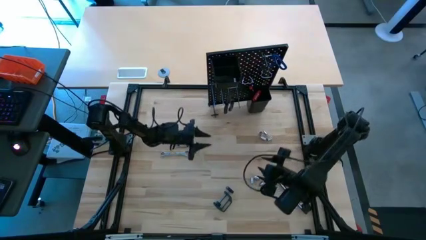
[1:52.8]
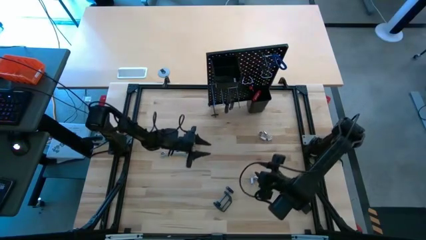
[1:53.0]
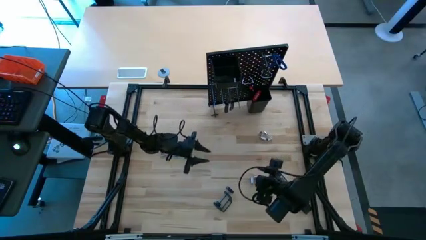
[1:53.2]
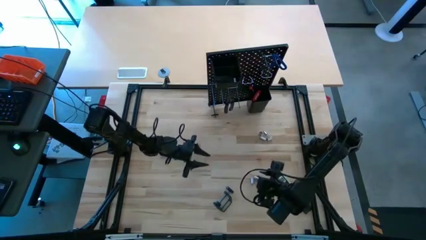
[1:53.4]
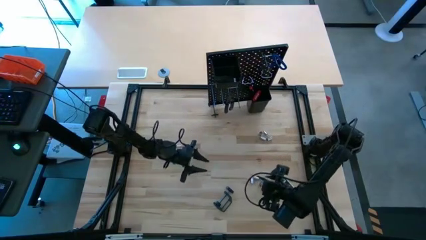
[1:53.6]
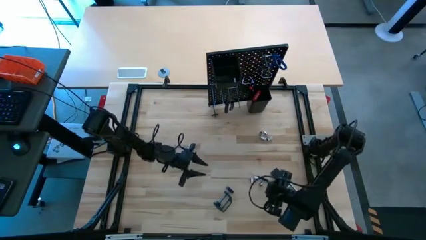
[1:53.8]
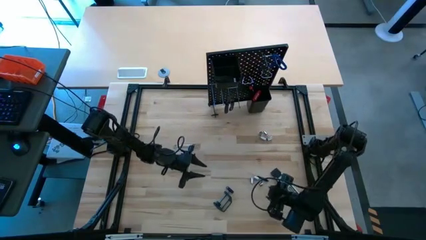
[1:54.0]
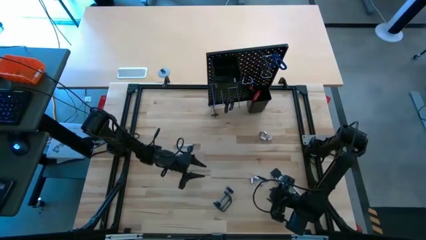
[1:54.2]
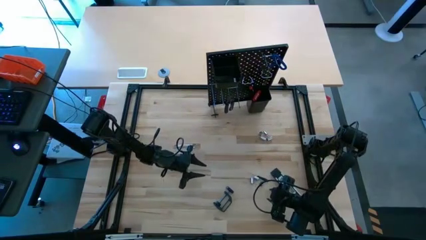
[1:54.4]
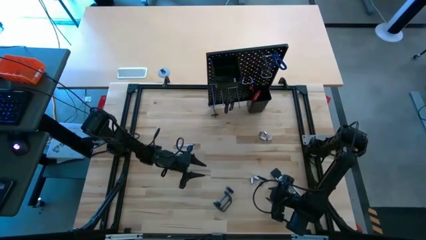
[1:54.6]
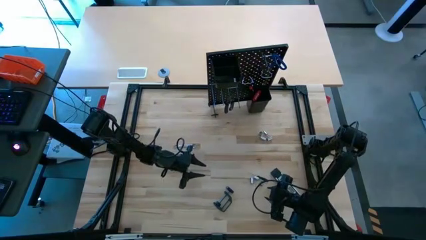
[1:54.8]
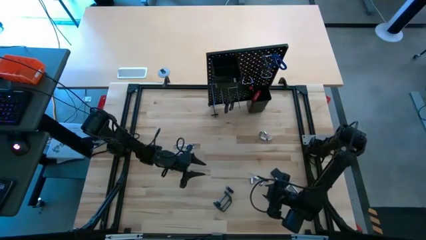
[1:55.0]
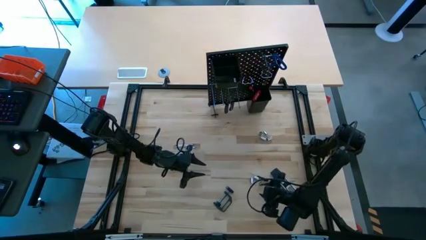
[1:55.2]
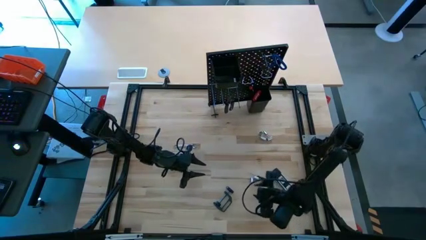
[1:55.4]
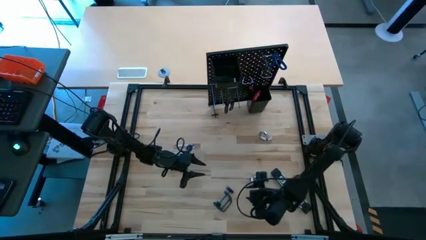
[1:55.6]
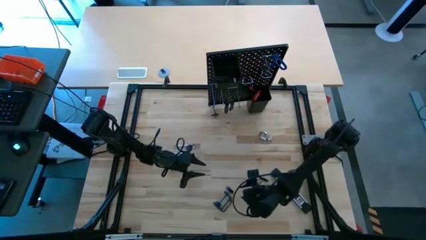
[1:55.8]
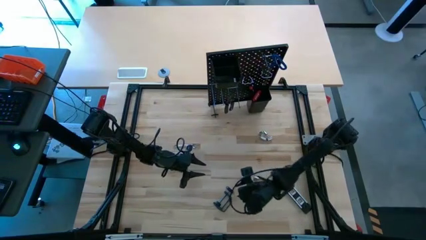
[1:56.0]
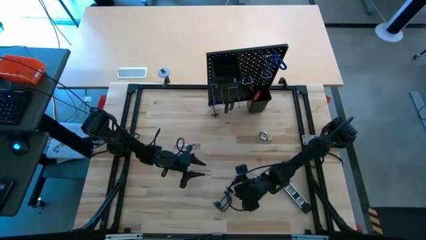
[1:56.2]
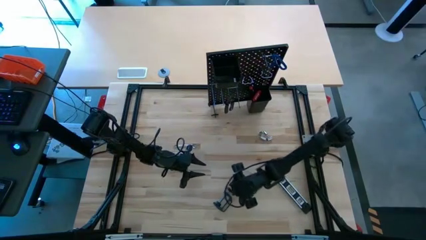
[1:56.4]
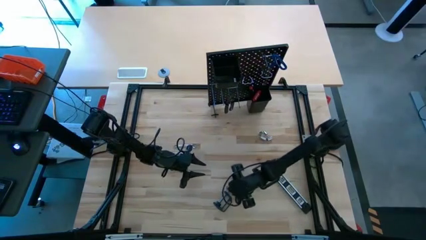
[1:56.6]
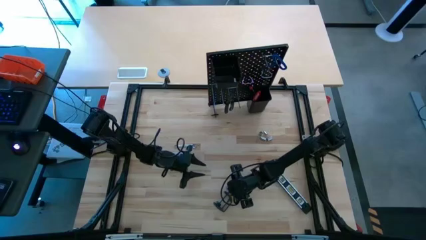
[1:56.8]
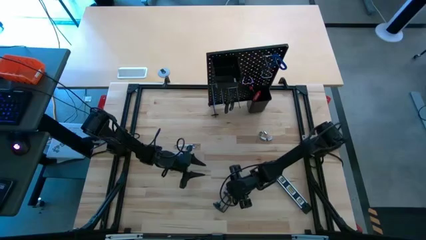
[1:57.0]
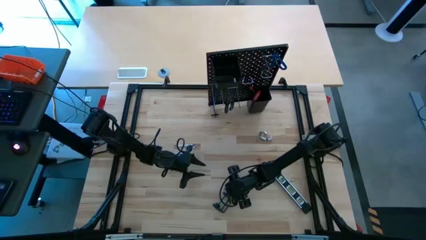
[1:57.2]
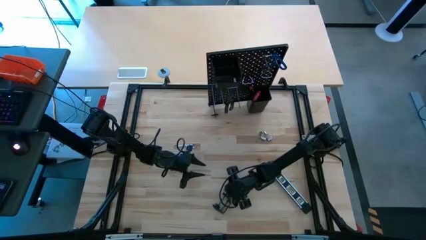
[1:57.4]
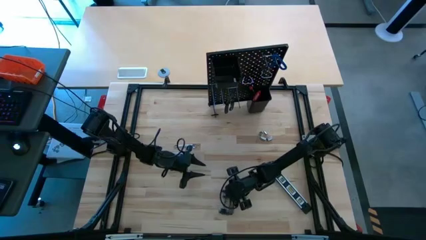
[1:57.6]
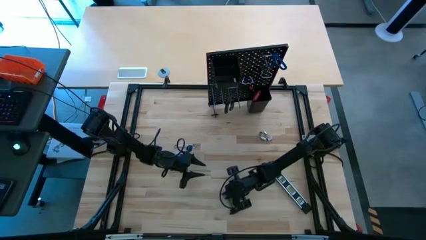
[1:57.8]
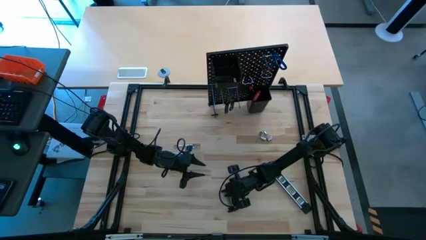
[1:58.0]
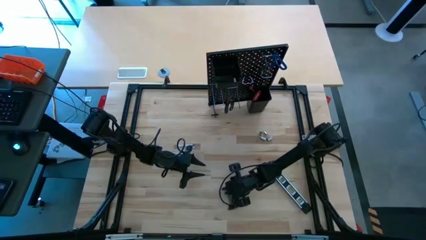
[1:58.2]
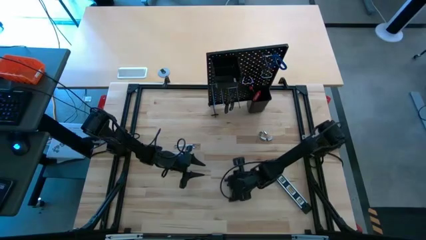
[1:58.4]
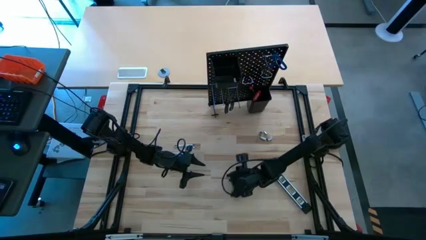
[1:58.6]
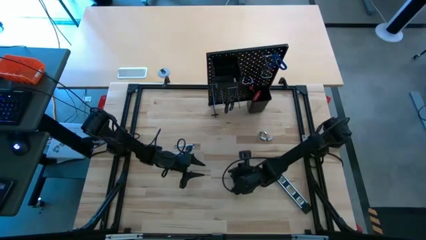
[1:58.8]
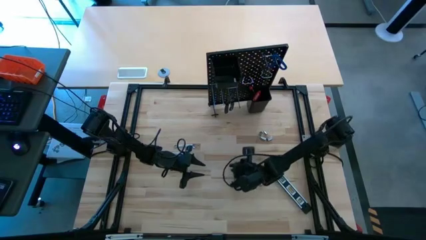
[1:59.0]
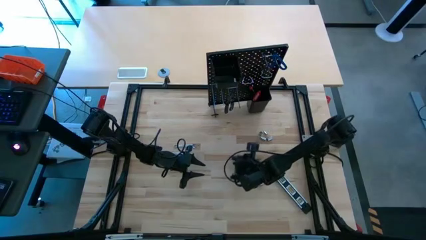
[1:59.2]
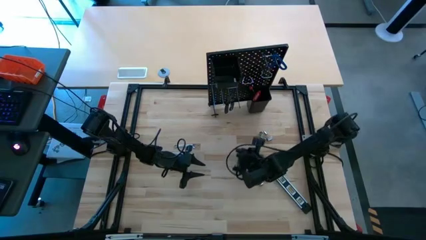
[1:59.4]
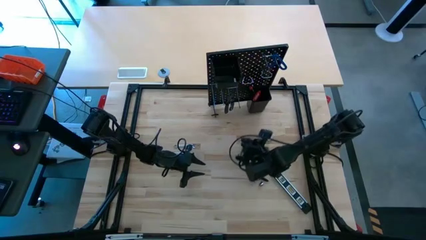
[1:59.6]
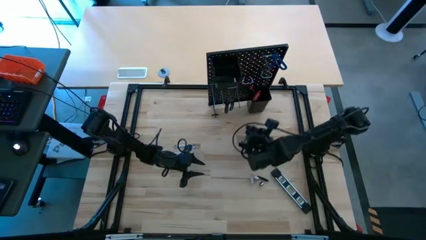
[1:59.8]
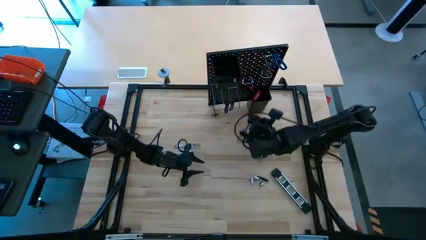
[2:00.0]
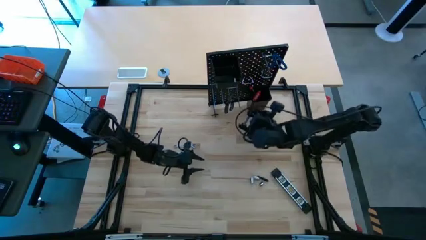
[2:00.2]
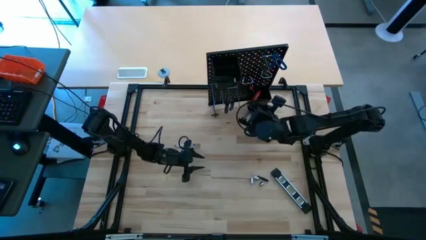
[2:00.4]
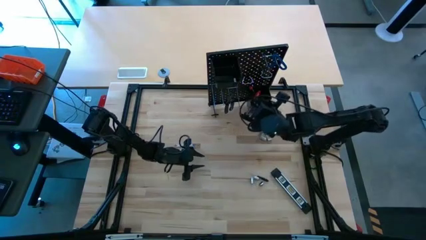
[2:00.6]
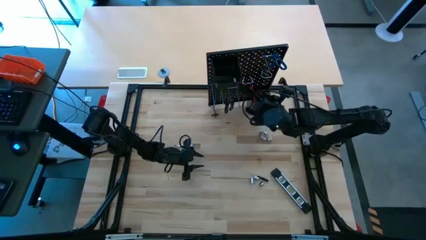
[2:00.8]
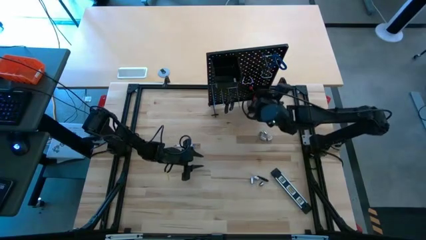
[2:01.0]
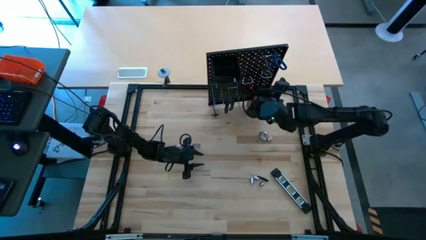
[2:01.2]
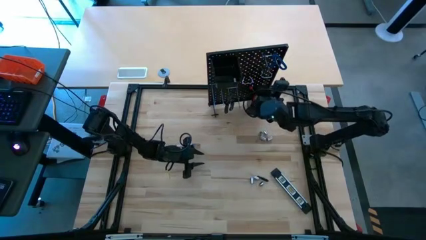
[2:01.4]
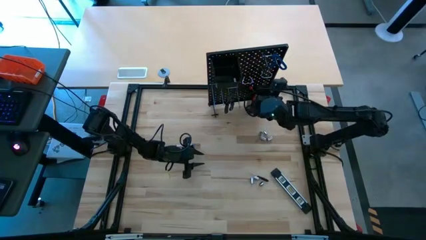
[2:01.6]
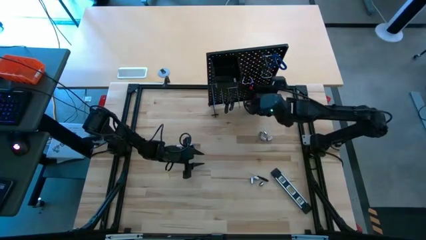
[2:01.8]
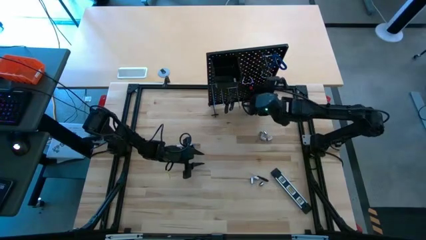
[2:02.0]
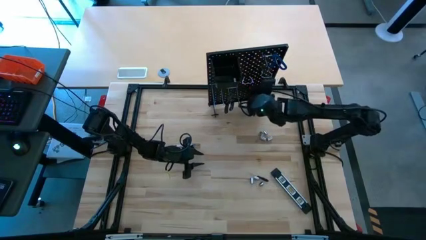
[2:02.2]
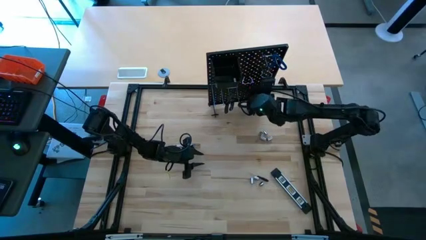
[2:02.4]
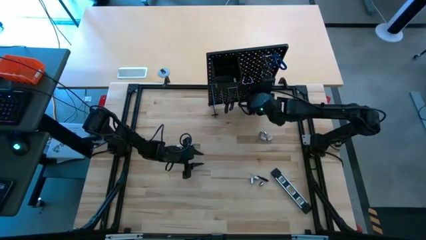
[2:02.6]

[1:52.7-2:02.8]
Task: Hang tools onto peg board
Hang the black clamp on the peg board

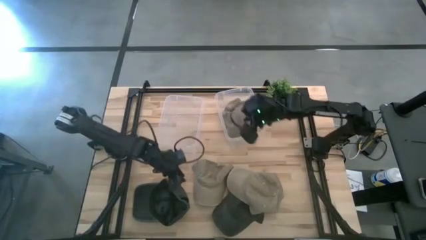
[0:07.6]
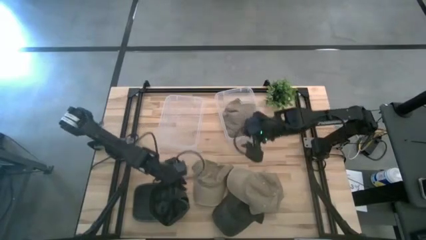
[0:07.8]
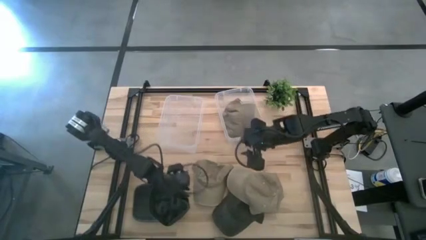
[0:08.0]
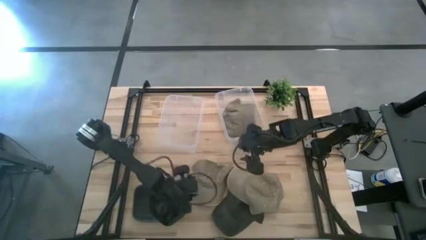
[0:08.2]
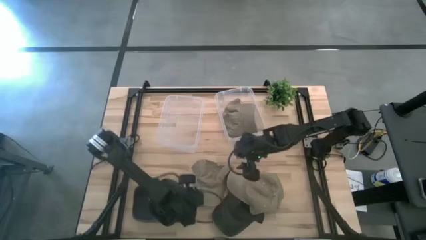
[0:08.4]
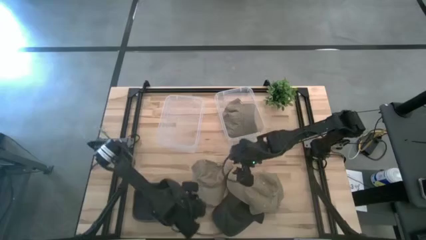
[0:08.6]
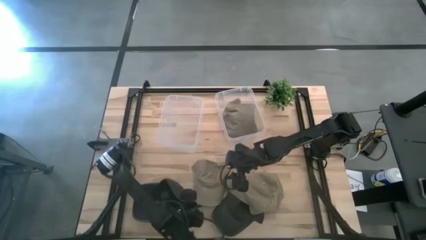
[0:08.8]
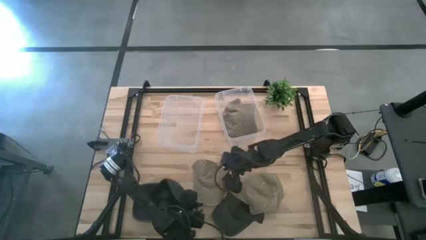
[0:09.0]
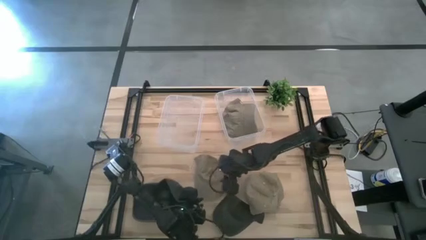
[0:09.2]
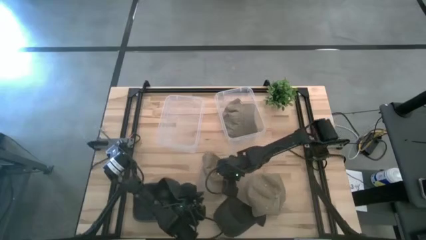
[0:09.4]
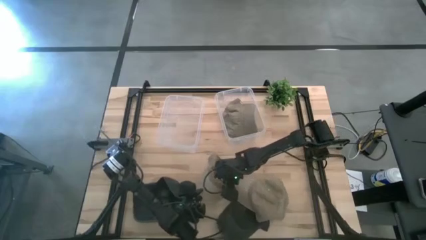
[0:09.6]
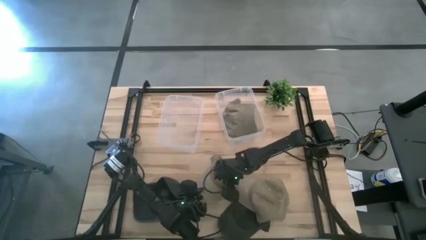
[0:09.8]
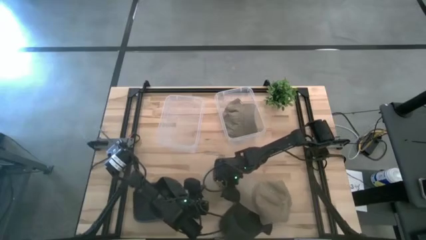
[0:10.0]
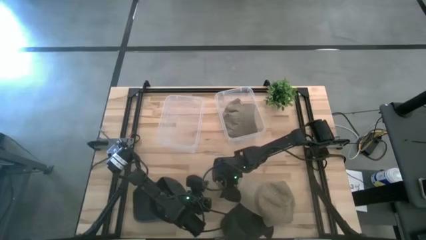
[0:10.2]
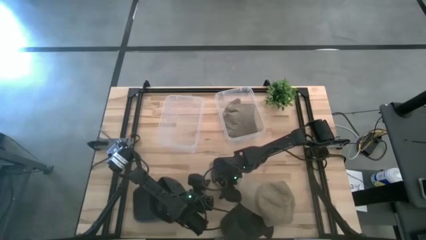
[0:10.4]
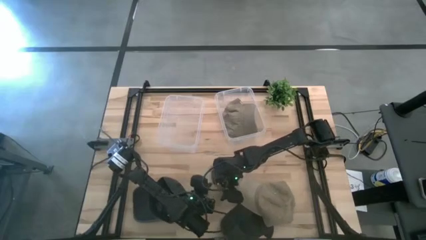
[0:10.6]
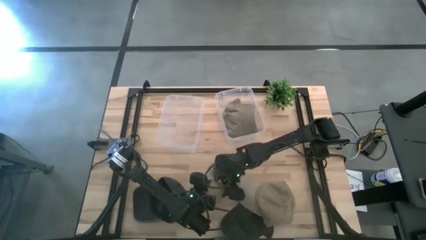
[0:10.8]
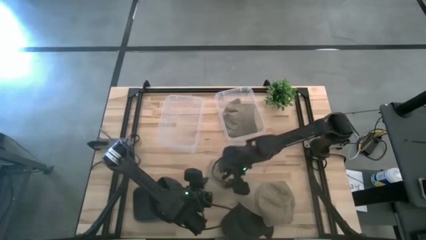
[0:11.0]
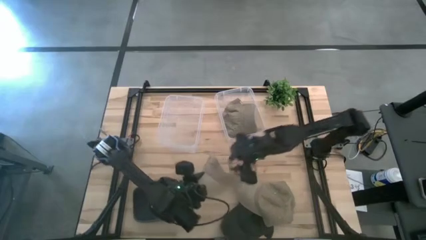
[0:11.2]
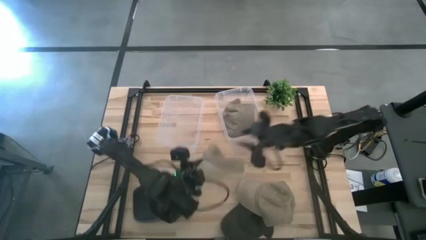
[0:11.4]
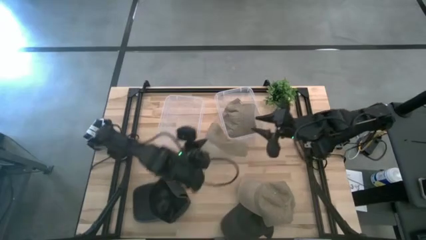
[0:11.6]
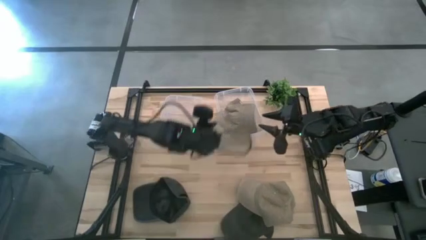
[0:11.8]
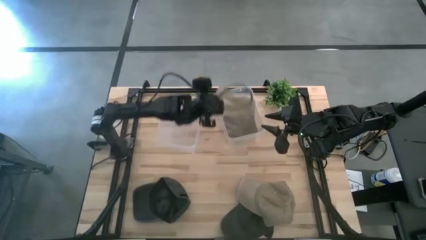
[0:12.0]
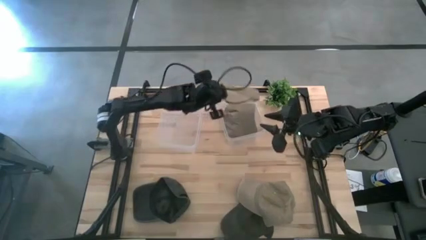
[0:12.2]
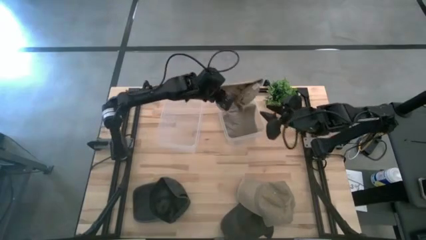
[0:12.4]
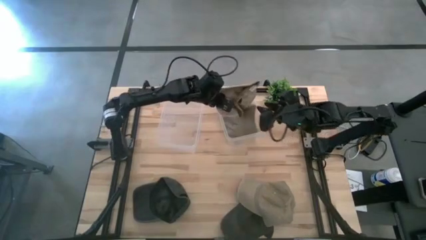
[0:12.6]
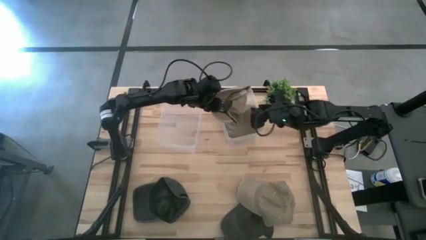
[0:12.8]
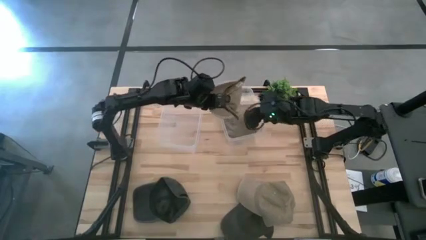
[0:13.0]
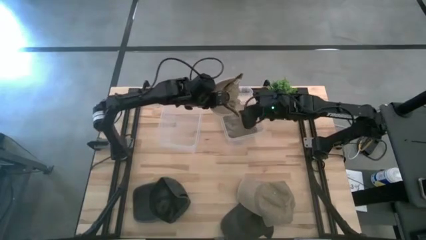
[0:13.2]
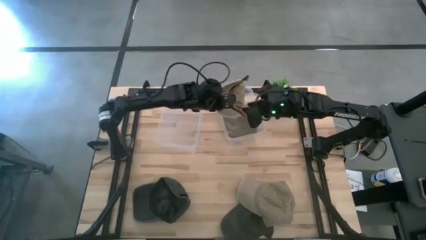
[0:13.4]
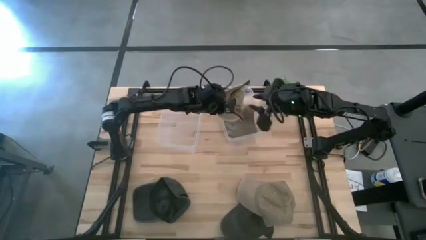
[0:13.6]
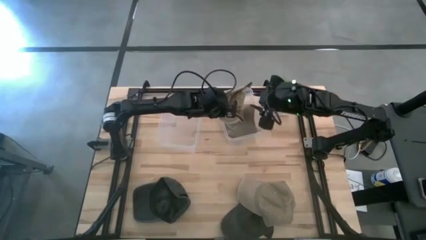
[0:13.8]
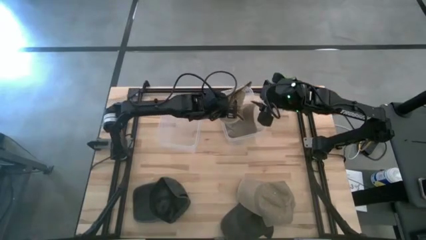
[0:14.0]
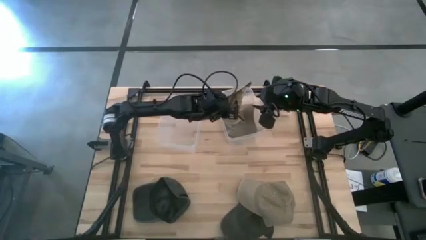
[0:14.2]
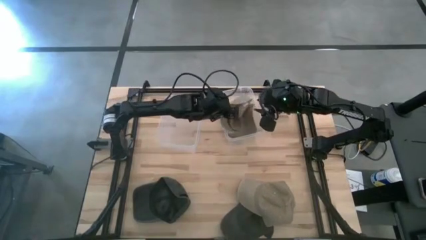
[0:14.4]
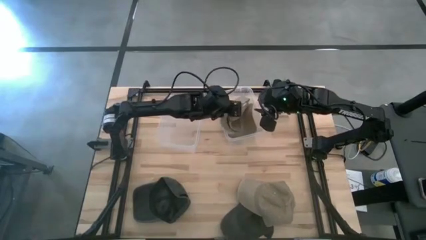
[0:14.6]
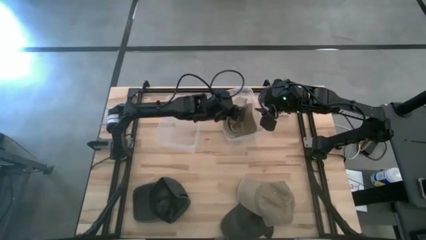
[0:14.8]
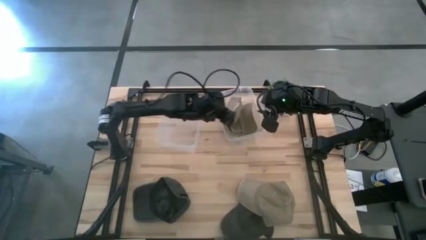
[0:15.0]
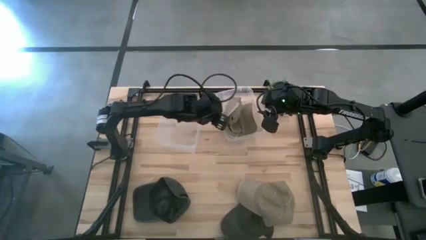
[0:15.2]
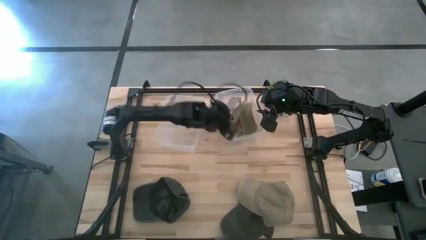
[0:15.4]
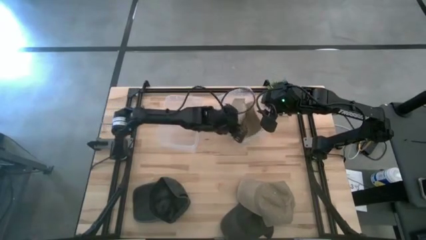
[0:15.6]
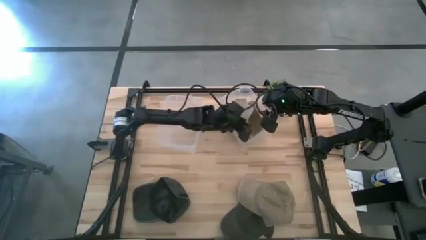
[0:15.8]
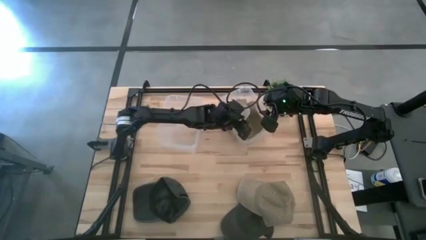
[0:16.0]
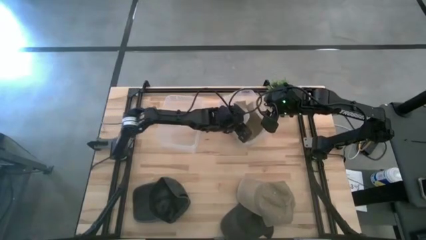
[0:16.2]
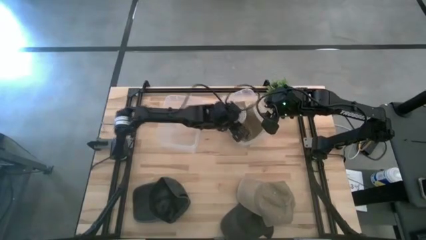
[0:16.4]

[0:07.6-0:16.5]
Task: Pick & Place hat
Put the left brown cap into the right transparent bin
